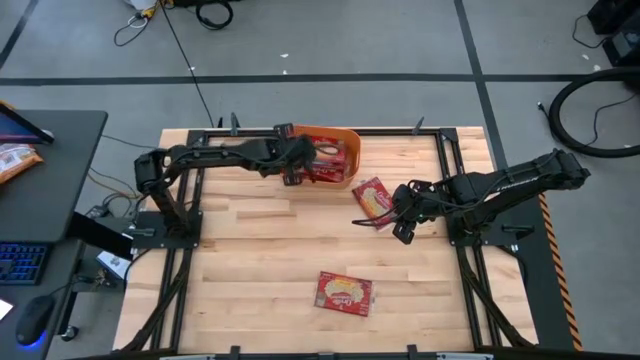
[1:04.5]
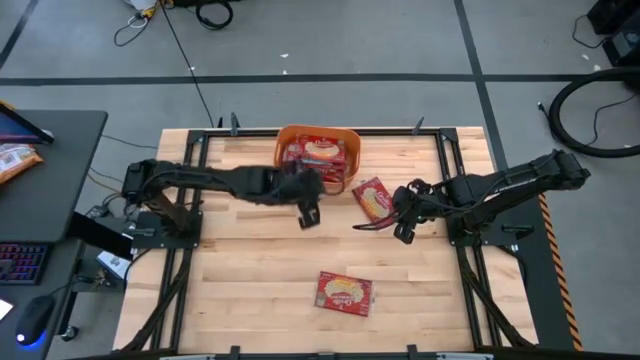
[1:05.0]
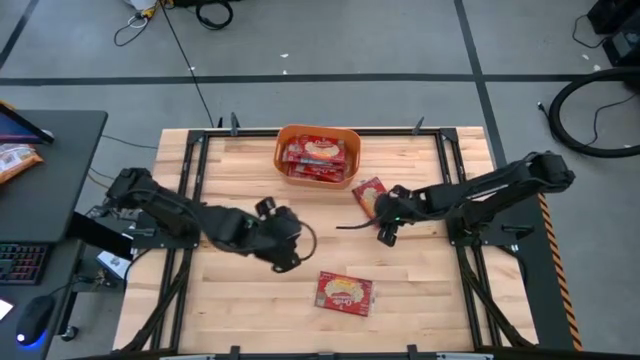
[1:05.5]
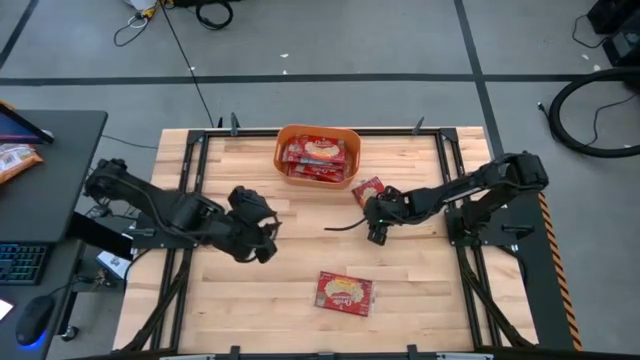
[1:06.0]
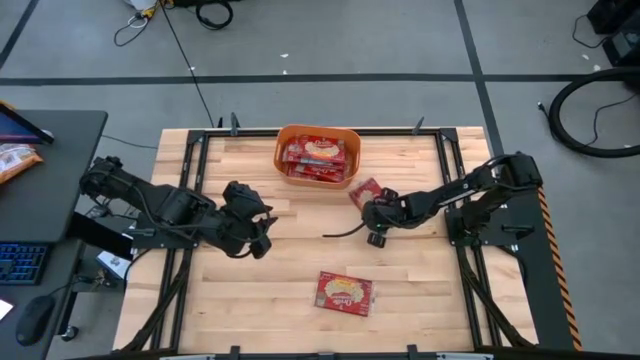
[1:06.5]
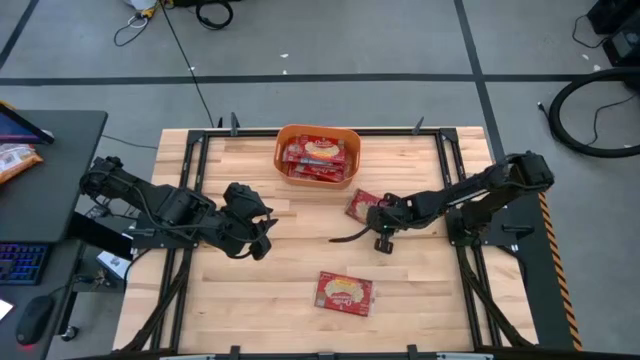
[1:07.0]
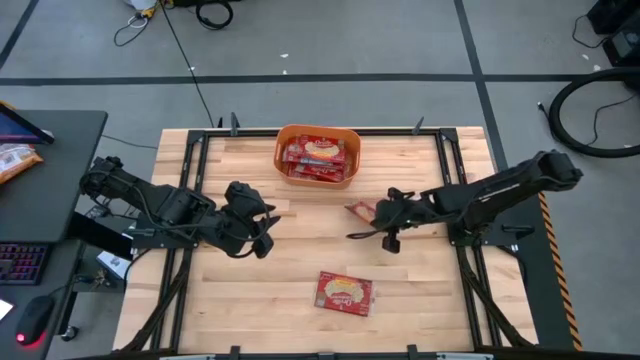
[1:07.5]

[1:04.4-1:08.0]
Task: Sort popcorn bags into baskets
Put the popcorn bag into the orange bin

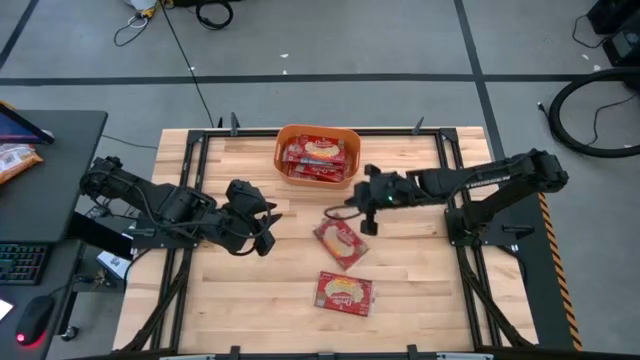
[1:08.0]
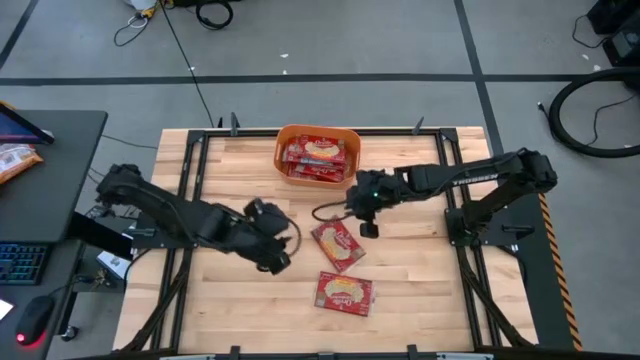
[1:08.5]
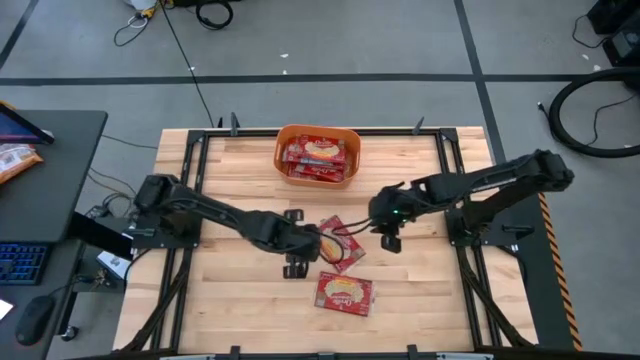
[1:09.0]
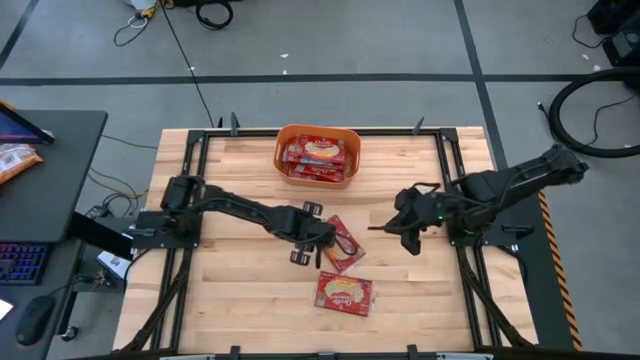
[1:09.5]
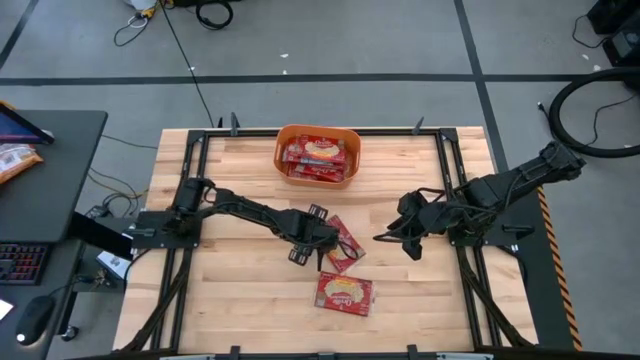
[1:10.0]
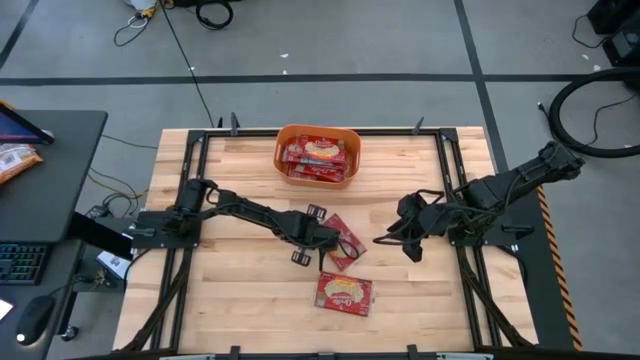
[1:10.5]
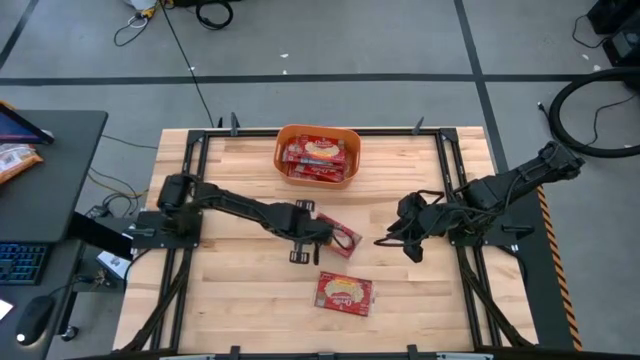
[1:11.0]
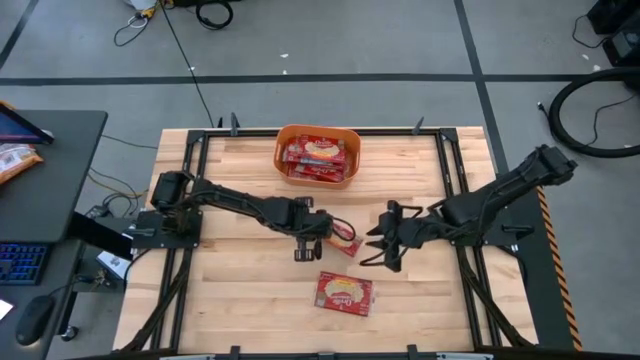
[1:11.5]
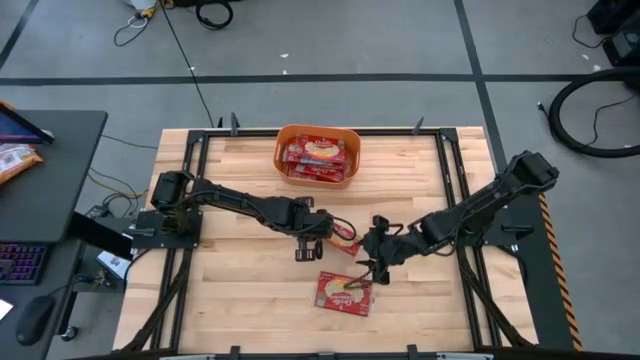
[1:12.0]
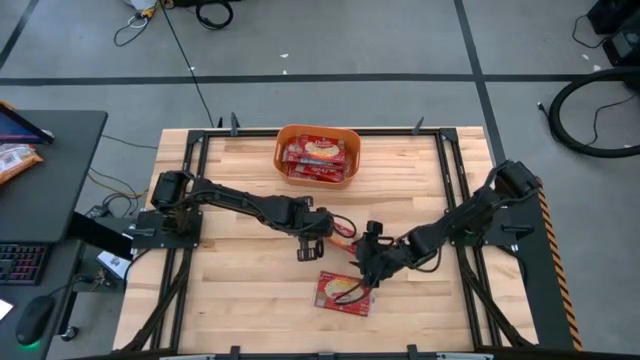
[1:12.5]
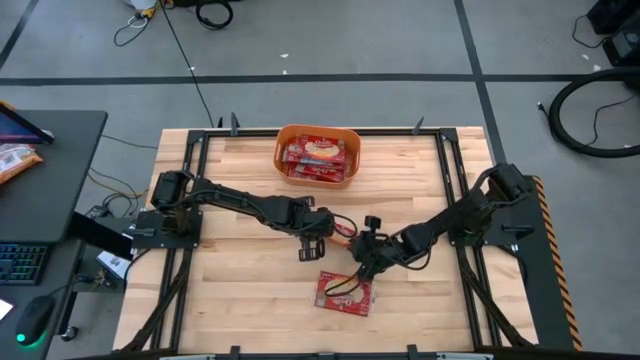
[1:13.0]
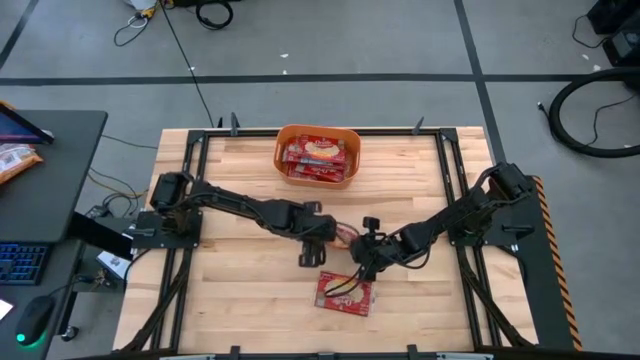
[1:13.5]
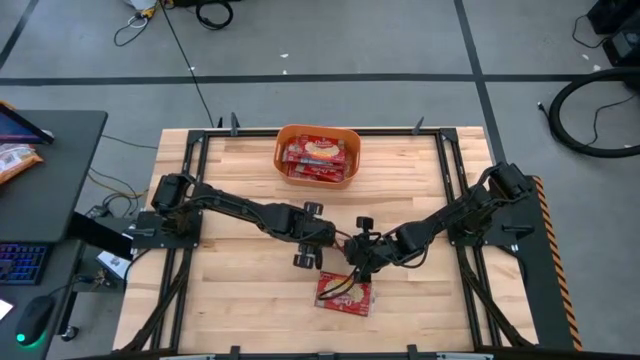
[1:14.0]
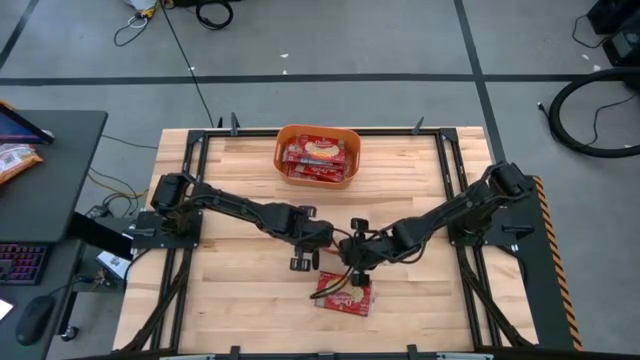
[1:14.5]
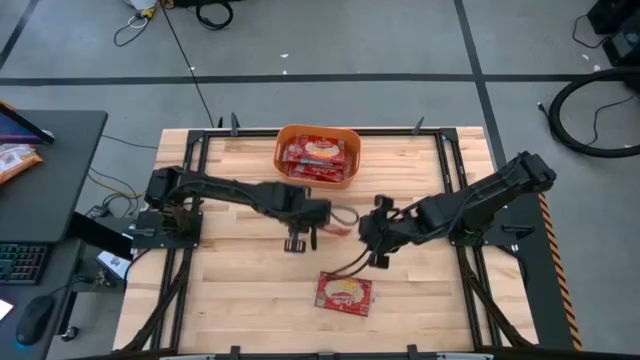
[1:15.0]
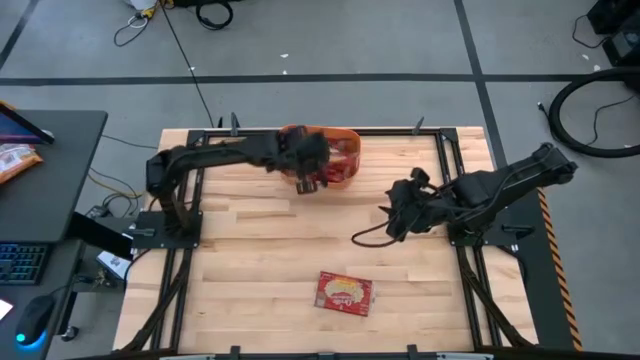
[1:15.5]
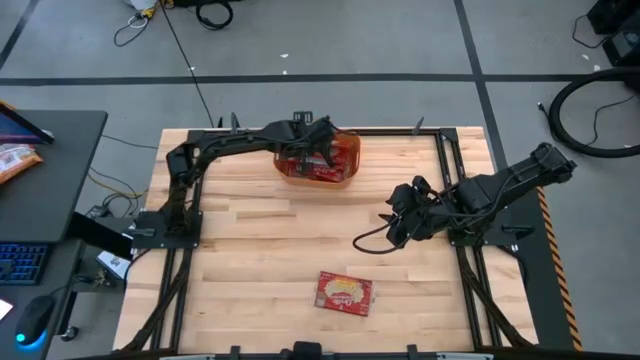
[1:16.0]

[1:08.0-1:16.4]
Put the popcorn bag into the orange bin

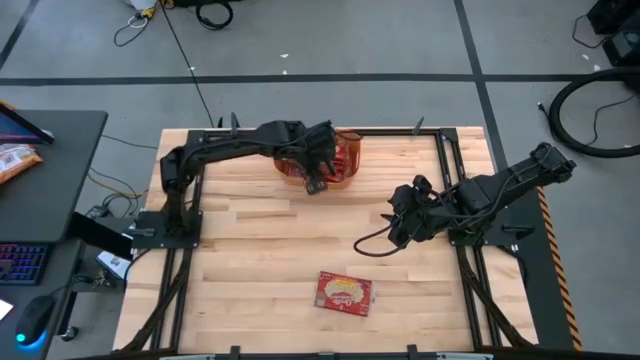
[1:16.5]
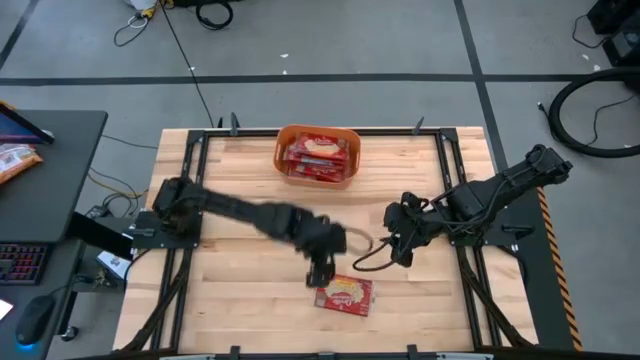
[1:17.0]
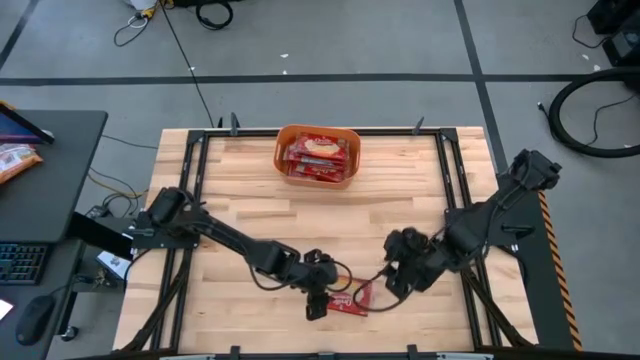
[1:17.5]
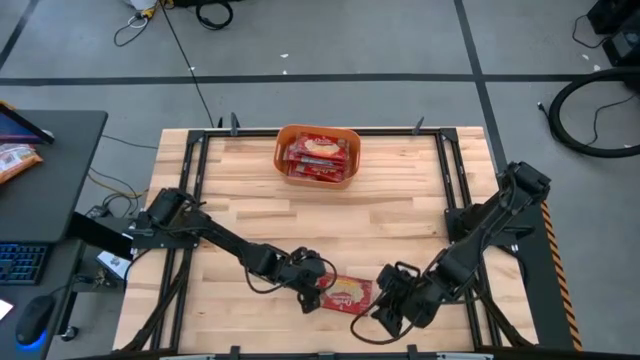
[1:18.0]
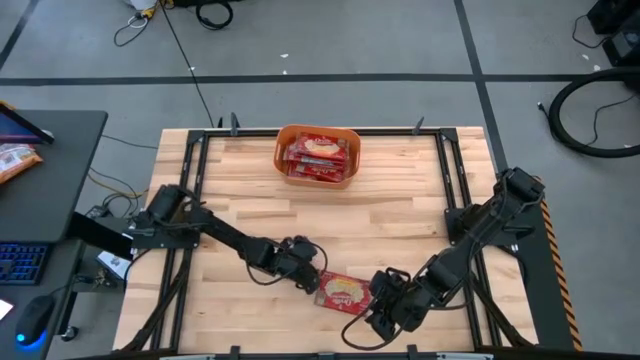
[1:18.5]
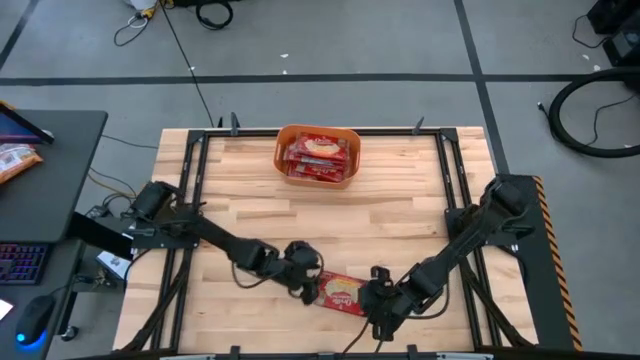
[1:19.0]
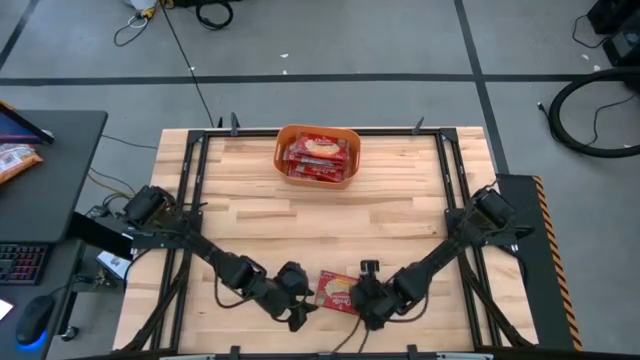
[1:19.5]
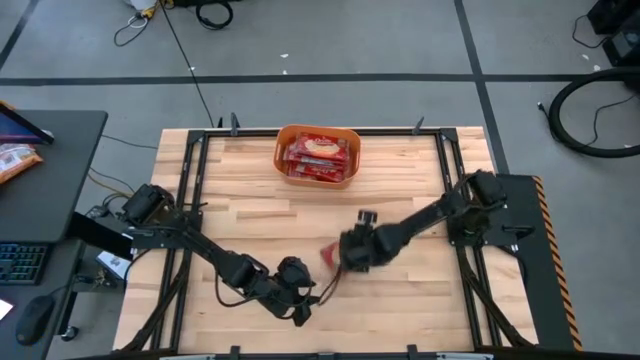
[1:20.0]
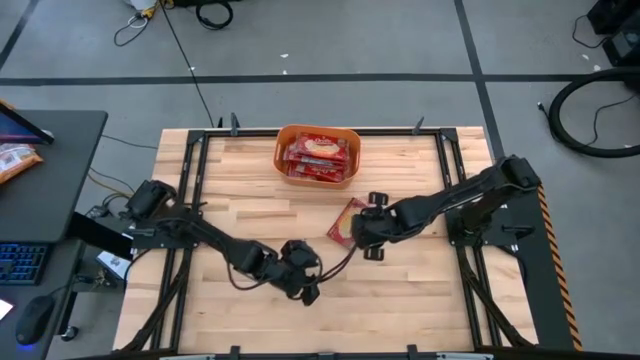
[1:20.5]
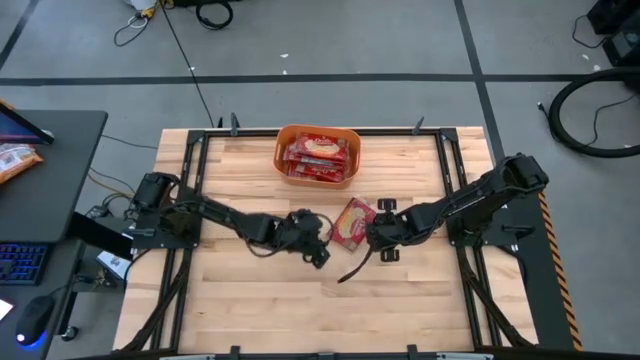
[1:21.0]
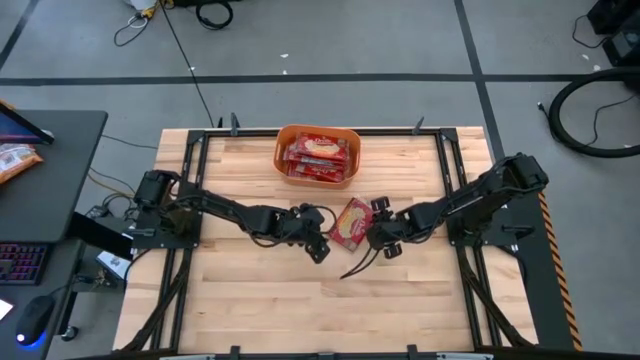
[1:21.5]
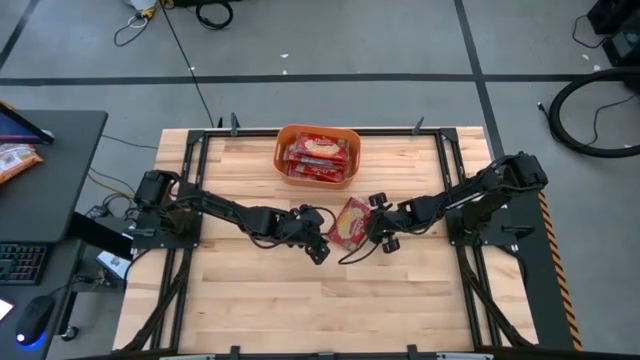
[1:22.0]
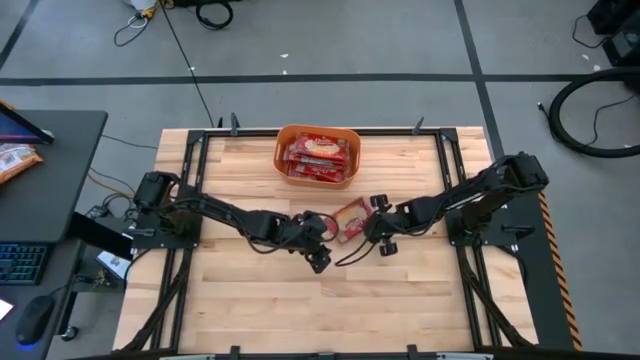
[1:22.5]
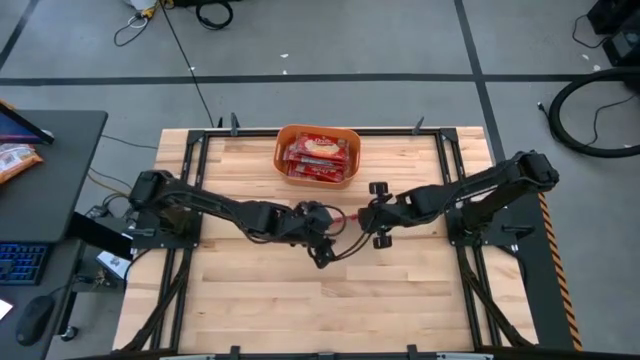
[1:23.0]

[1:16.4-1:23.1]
Put the popcorn bag into the orange bin

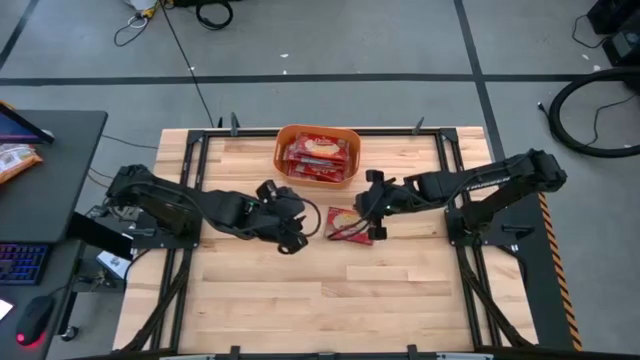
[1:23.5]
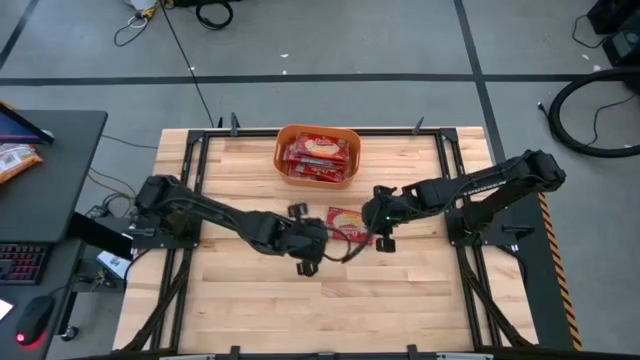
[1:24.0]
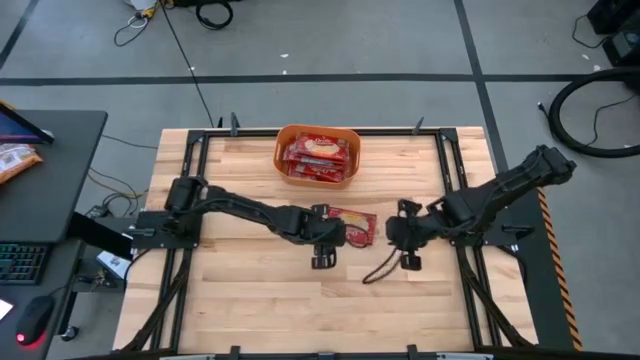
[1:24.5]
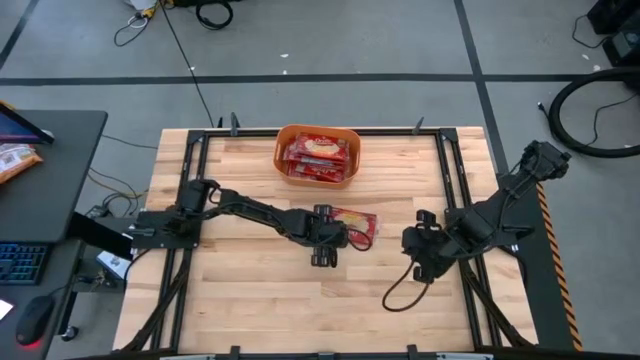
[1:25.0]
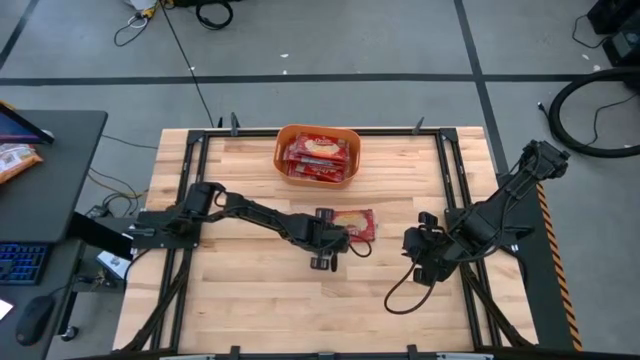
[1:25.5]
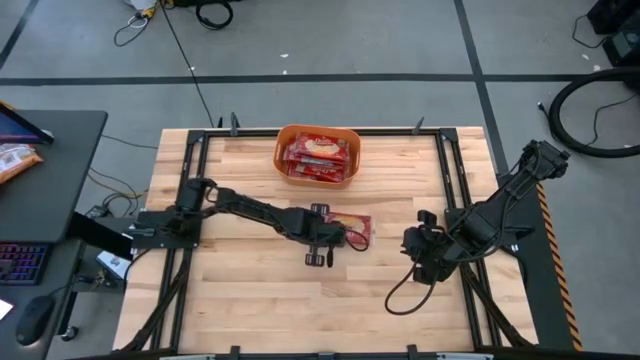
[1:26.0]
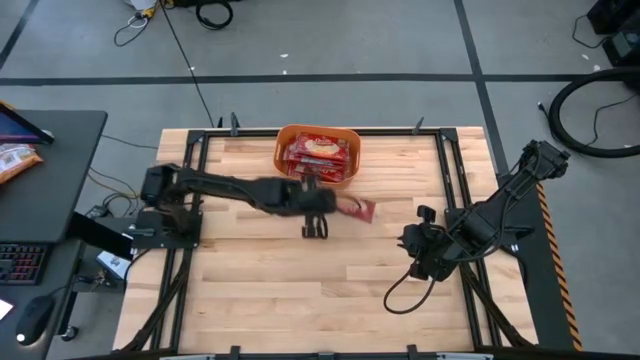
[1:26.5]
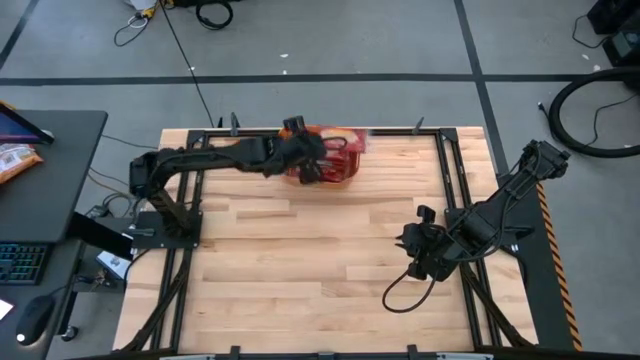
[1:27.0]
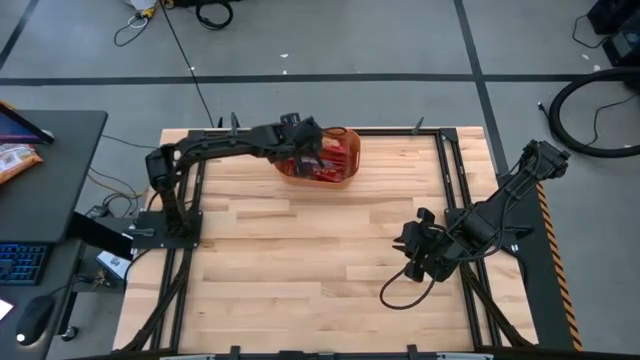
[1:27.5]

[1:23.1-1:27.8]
Put the popcorn bag into the orange bin
